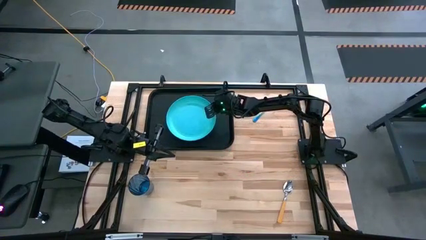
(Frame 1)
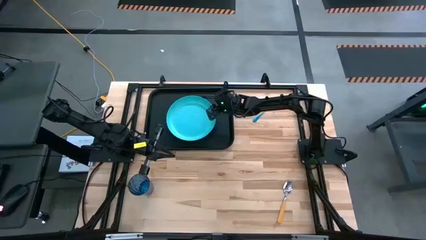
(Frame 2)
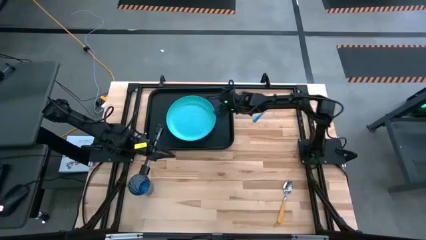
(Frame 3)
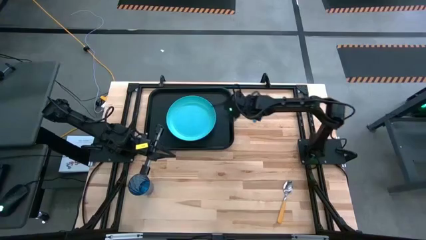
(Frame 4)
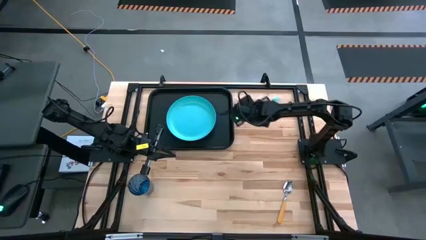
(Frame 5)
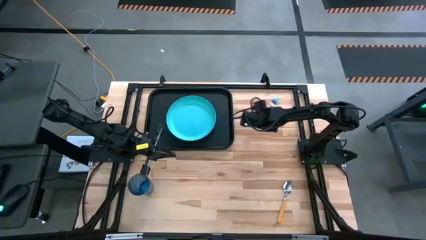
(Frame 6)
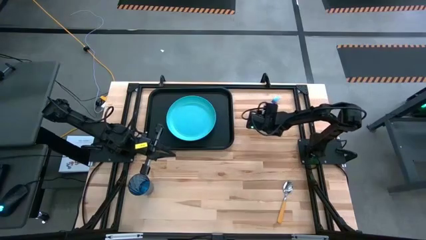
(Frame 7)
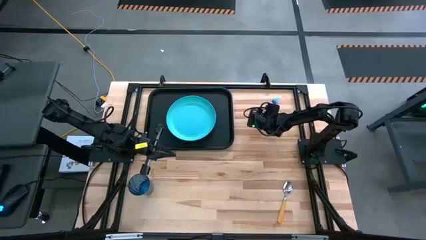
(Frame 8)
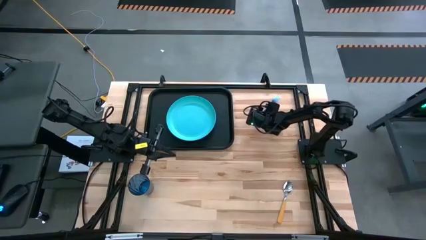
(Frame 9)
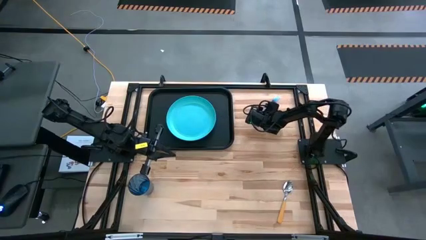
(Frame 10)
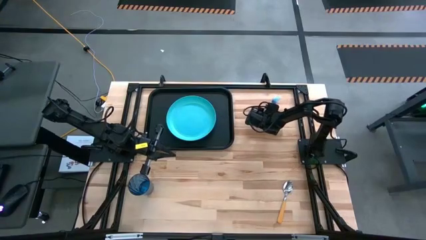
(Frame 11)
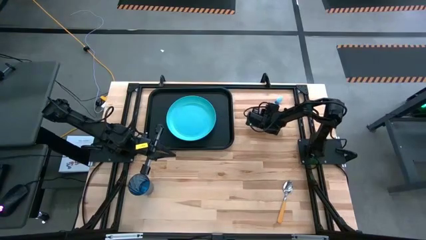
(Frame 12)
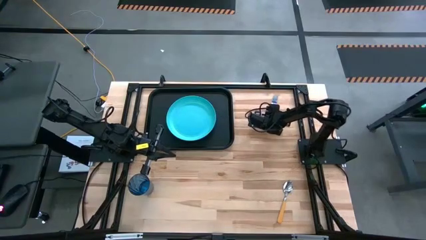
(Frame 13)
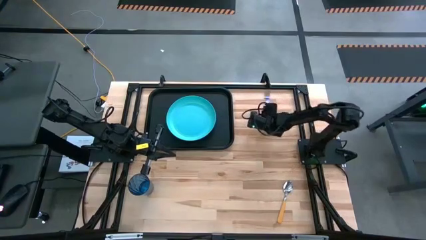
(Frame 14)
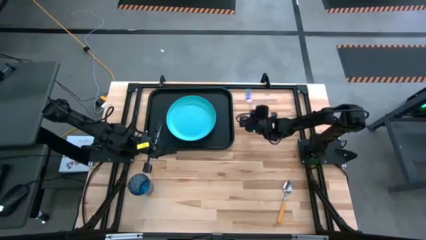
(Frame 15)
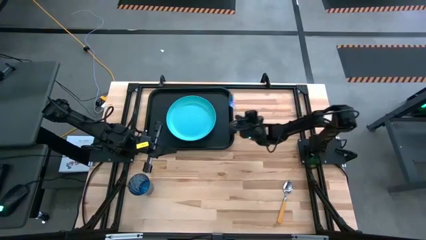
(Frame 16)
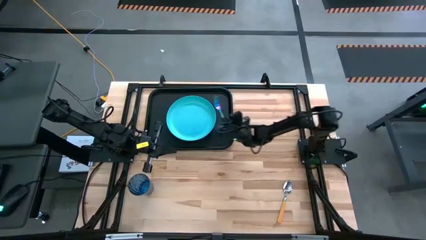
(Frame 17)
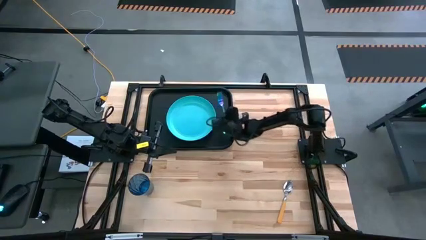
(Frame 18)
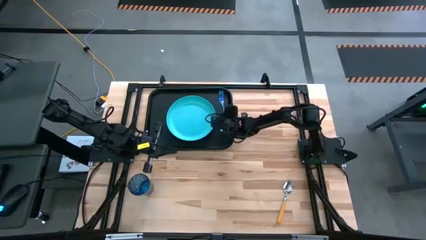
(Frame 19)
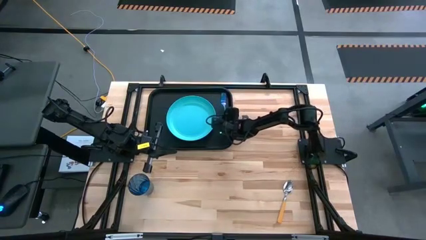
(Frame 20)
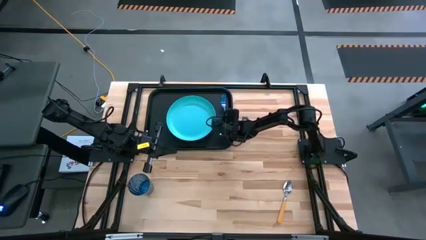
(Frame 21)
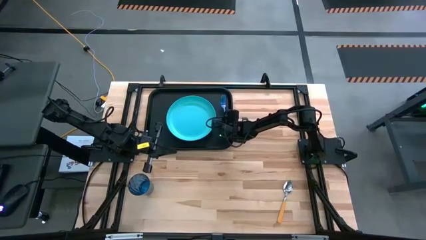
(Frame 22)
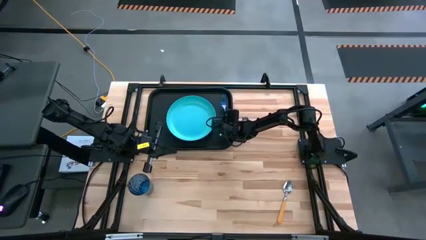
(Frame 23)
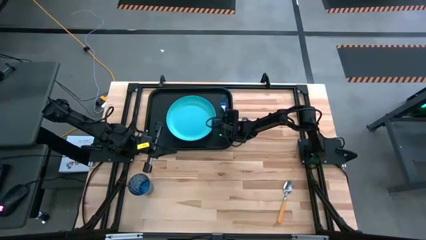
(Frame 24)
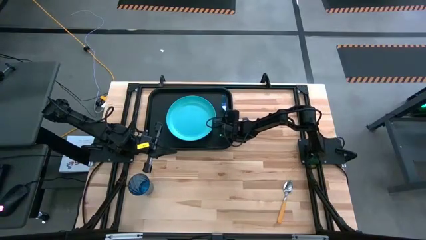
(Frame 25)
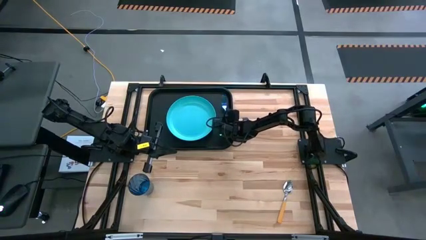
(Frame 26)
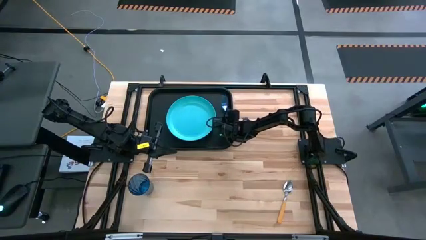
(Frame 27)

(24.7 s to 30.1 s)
Task: Pick and place plate/cup/fork/spoon on tray
Put the blue fork on the black serving tray beside the blue plate

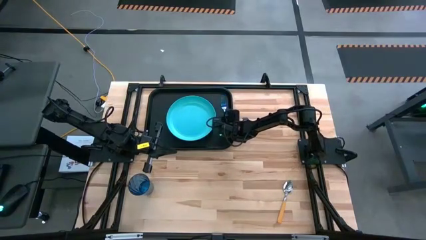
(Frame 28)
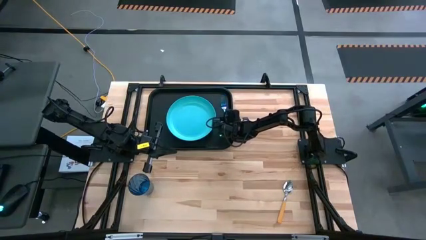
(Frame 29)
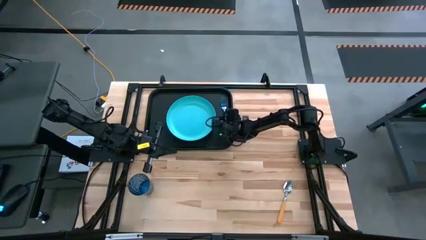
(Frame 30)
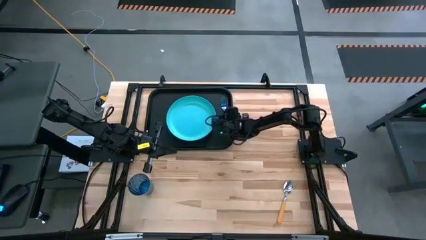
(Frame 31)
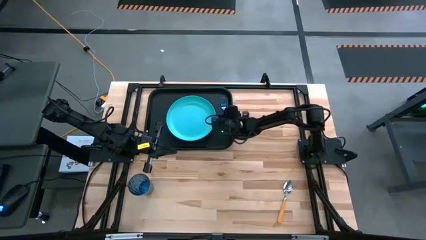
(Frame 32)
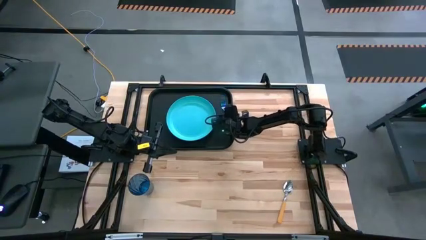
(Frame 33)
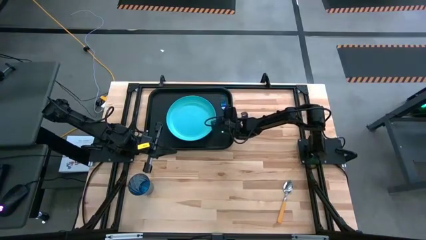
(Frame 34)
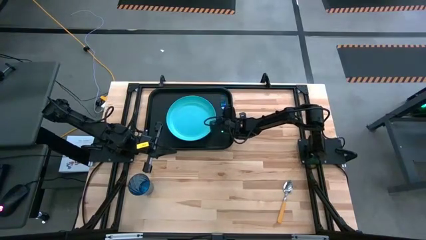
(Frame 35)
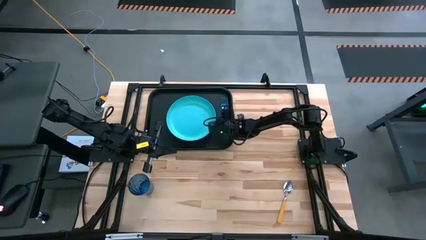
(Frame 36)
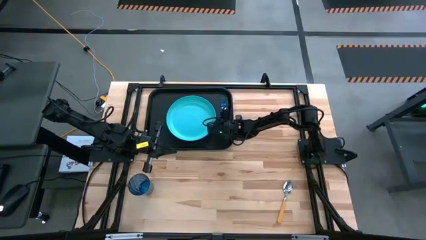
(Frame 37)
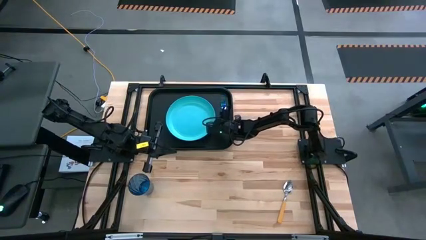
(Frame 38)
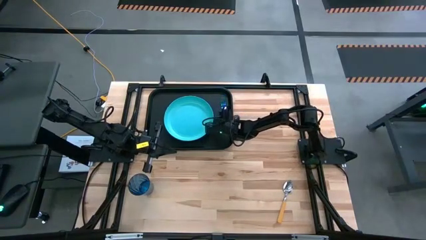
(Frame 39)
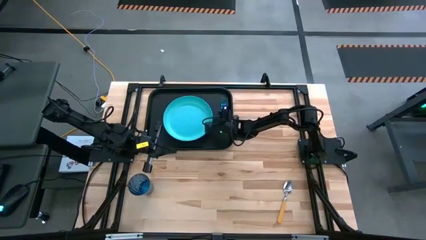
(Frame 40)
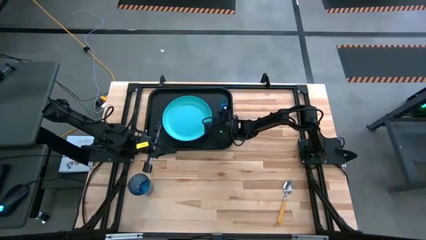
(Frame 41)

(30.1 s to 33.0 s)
Adjust the blue plate

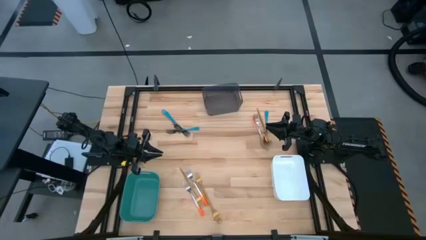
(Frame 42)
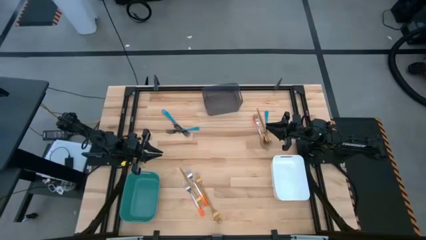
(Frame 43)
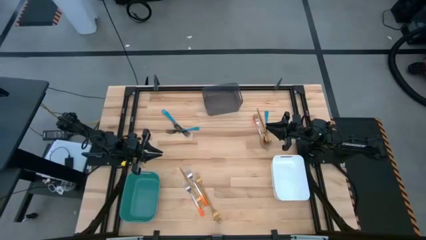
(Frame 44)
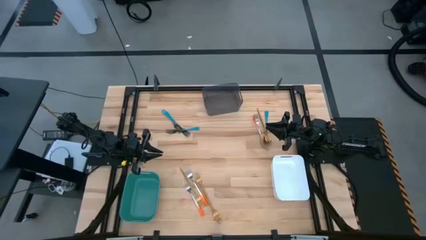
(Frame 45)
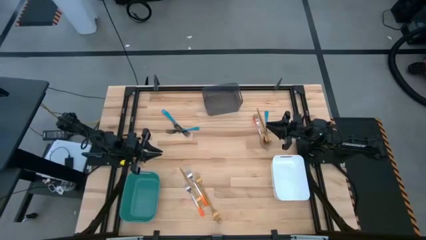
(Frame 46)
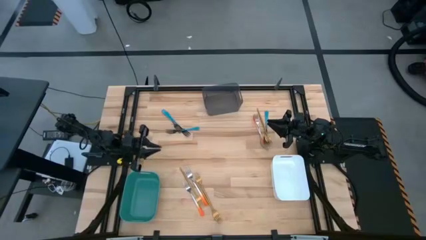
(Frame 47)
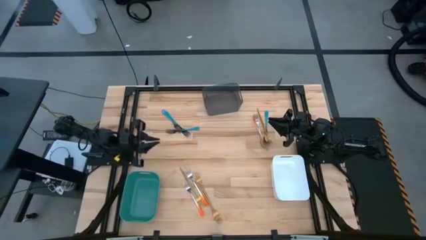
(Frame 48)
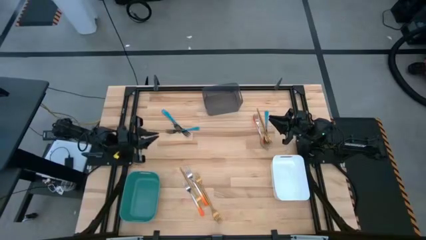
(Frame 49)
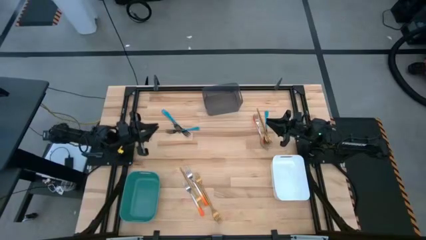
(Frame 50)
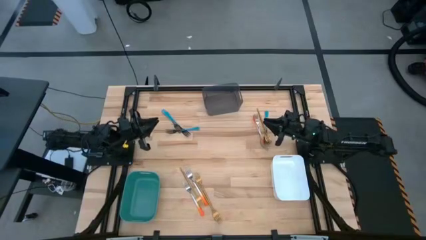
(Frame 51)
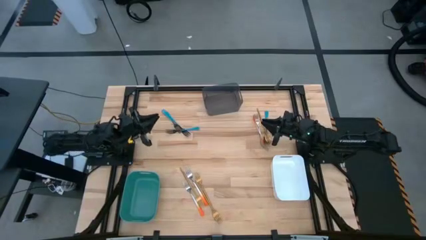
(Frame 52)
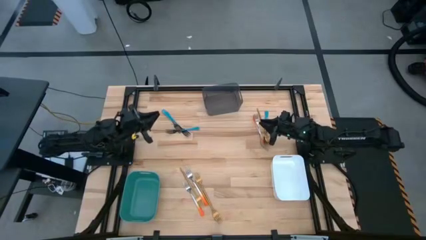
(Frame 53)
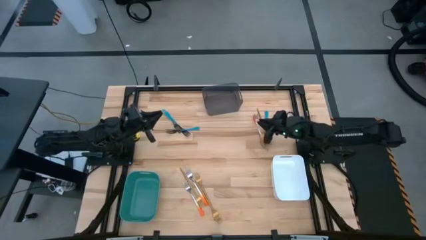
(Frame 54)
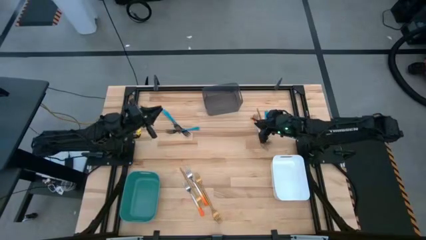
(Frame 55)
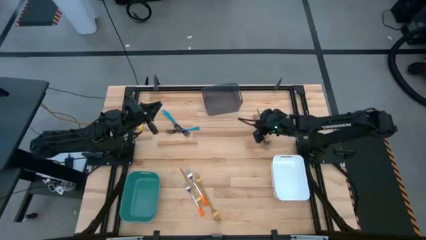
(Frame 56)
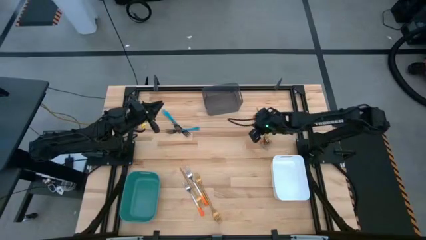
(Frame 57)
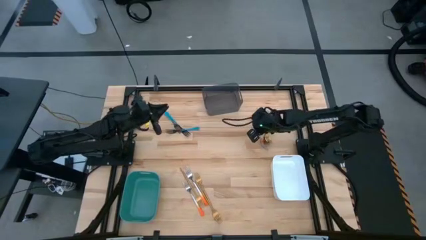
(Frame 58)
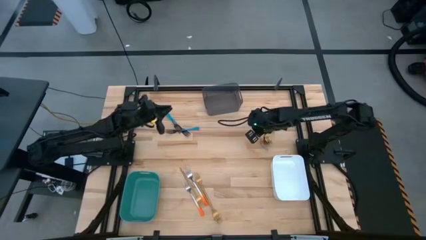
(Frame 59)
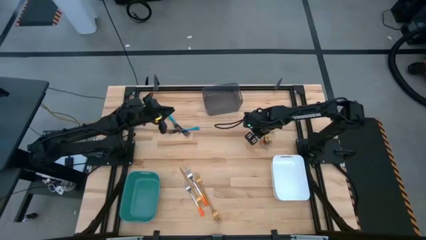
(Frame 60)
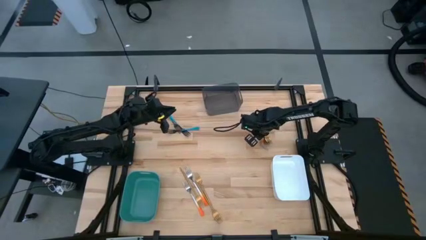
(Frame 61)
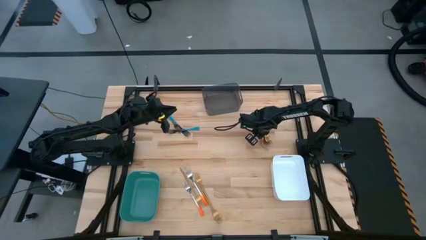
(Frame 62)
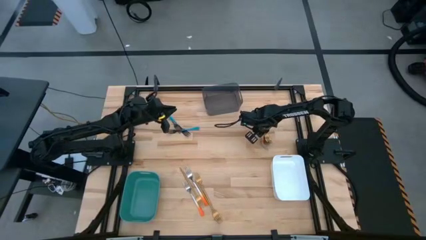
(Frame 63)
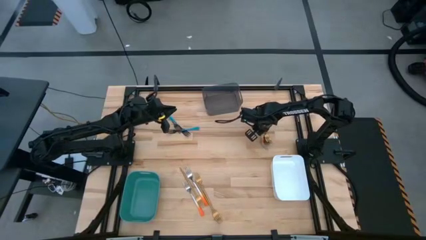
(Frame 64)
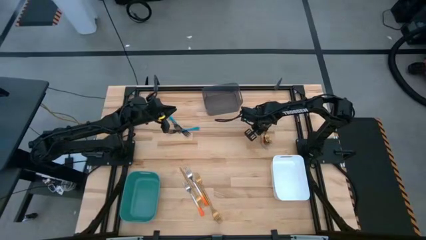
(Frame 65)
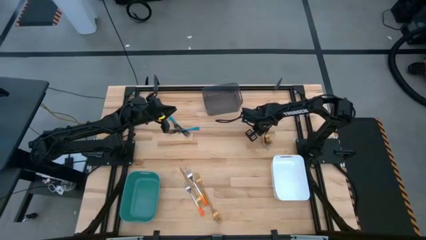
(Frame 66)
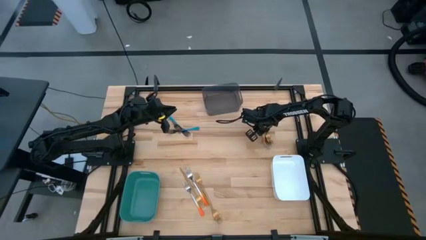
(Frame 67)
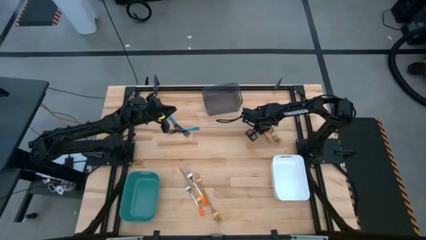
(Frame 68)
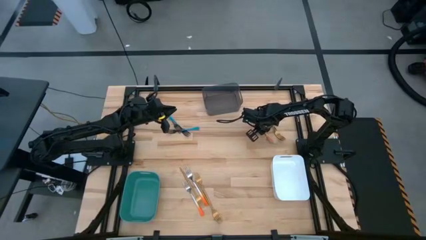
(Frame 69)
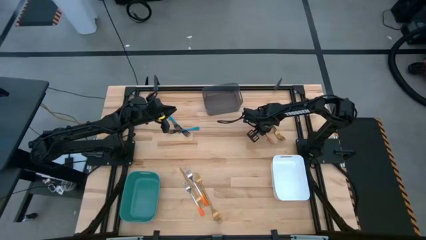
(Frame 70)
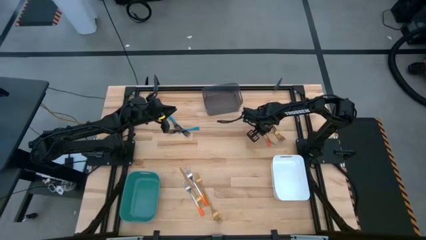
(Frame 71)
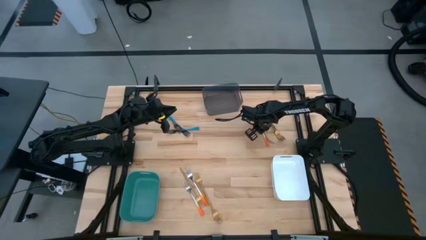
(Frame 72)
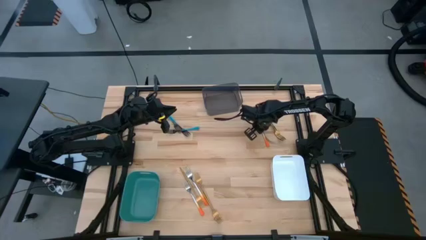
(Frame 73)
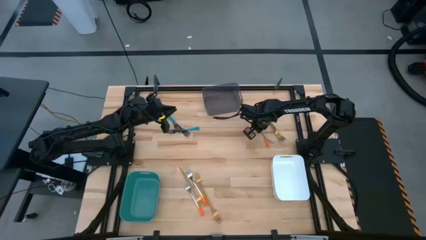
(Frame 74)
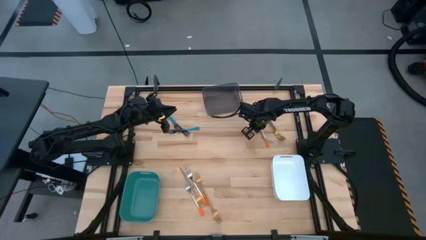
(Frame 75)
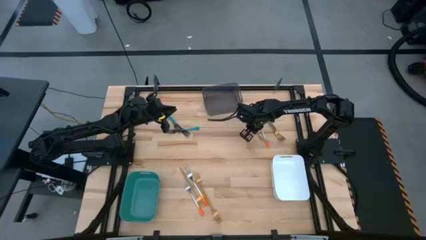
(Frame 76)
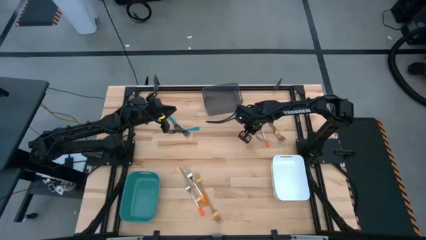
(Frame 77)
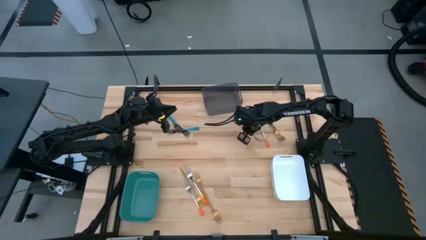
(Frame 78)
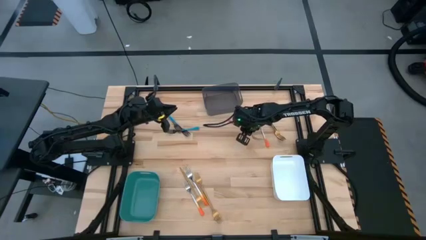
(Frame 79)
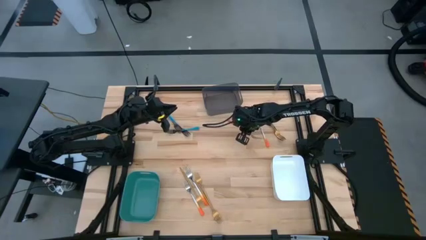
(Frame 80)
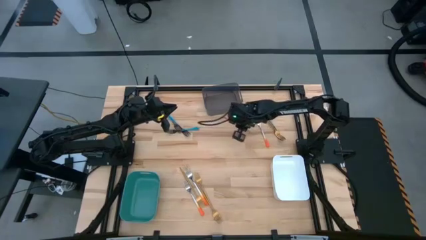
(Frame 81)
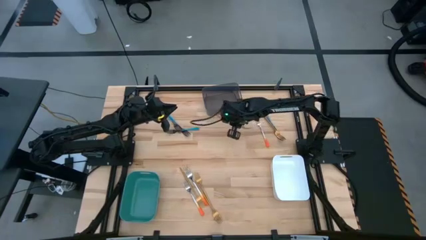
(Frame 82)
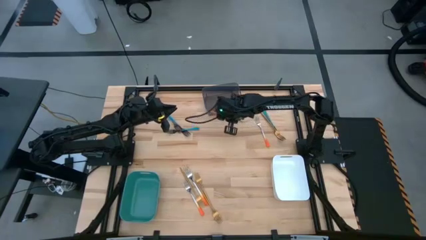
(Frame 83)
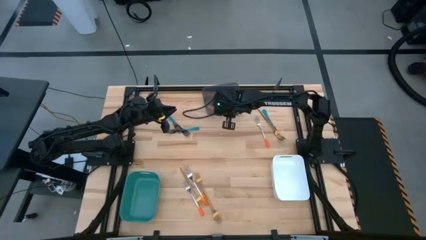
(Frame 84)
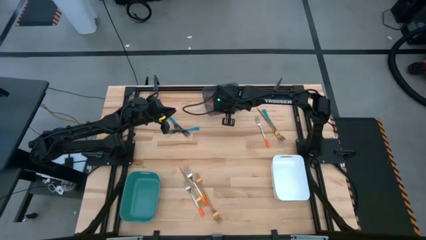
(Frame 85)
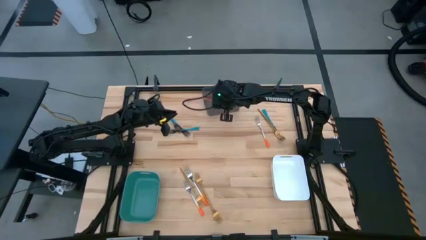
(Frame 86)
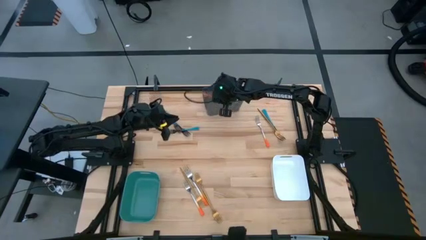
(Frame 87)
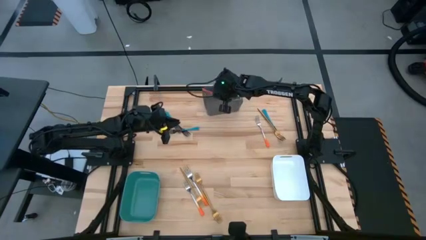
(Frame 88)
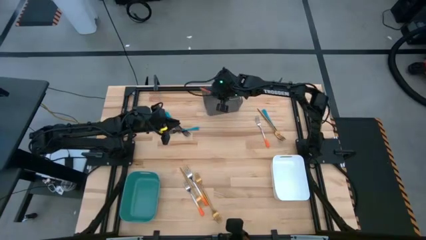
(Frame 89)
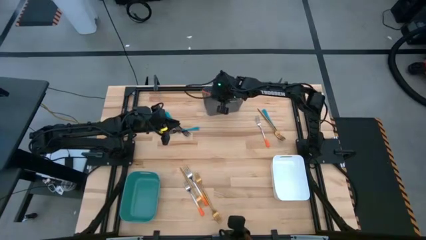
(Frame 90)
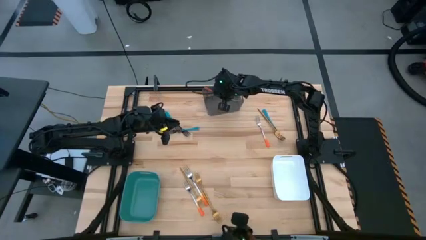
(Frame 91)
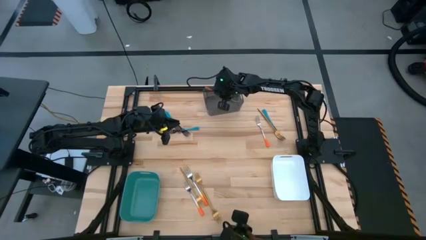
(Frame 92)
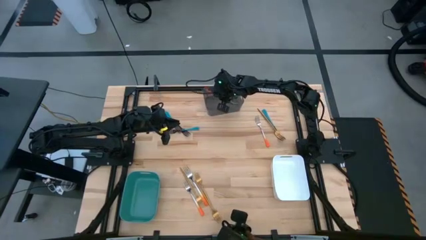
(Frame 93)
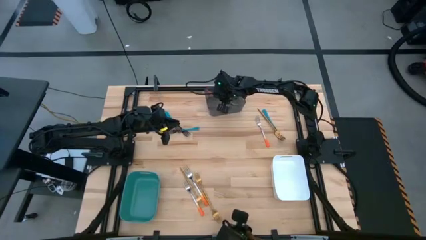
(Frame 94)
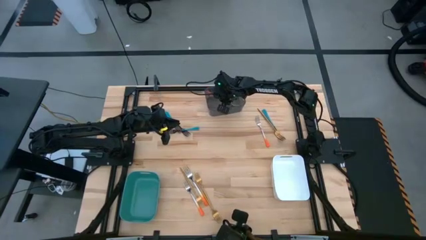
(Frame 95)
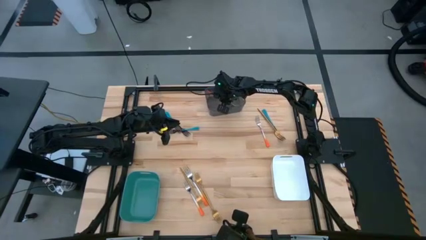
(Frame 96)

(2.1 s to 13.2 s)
Task: Sort silverware by color (type)
Put the orange fork into the black bin
